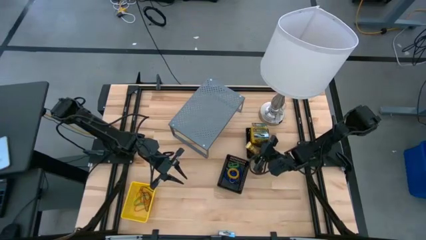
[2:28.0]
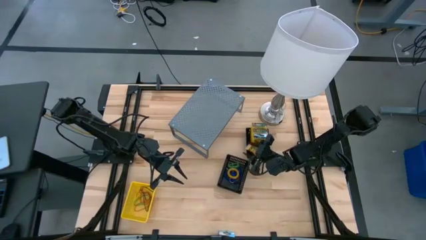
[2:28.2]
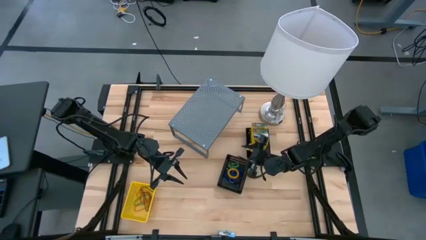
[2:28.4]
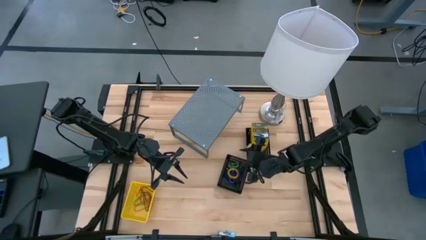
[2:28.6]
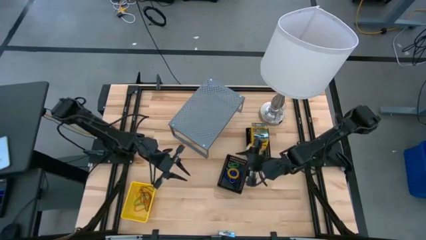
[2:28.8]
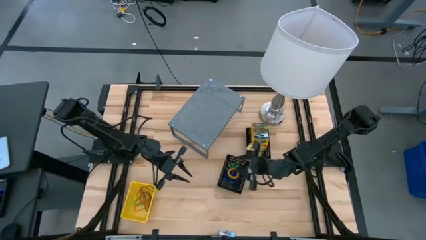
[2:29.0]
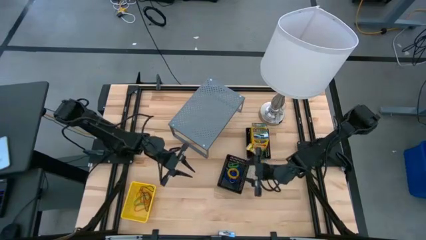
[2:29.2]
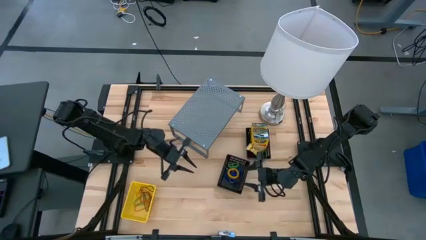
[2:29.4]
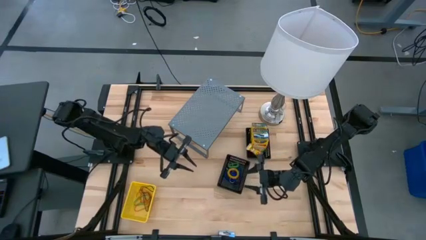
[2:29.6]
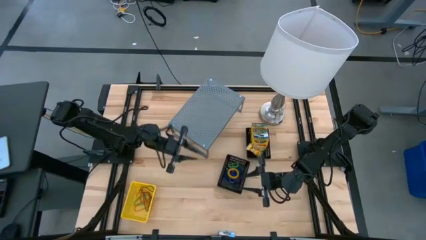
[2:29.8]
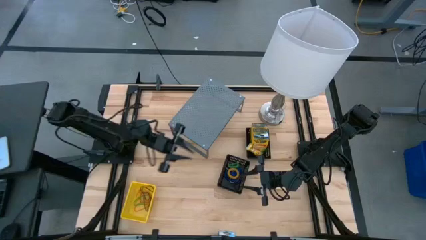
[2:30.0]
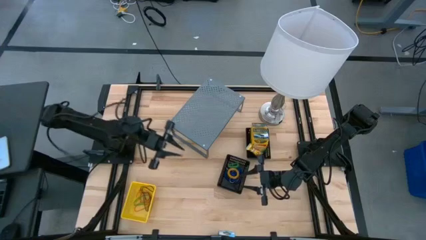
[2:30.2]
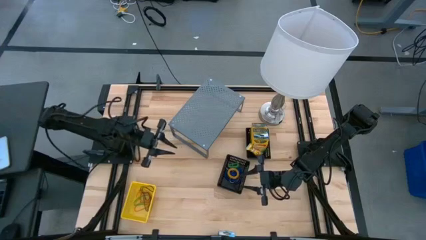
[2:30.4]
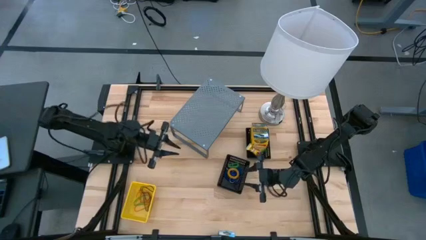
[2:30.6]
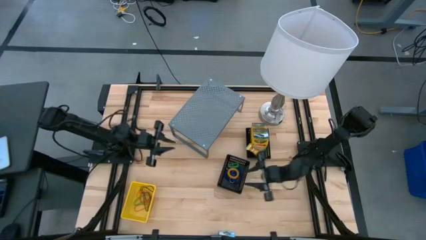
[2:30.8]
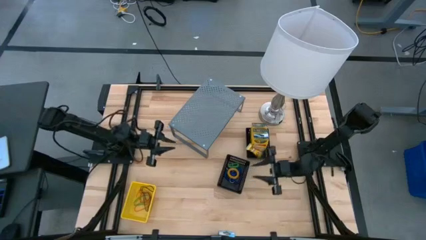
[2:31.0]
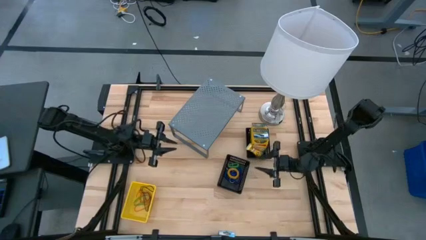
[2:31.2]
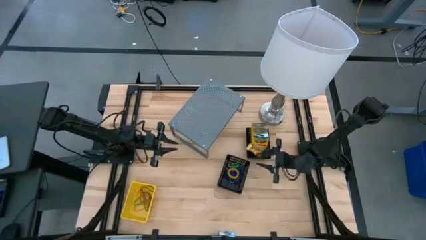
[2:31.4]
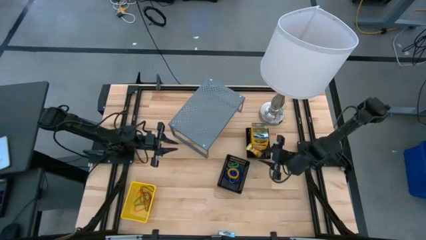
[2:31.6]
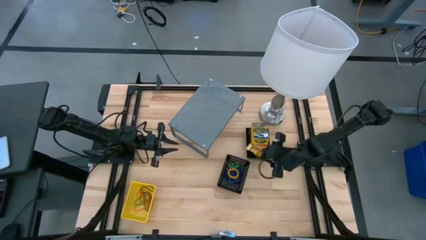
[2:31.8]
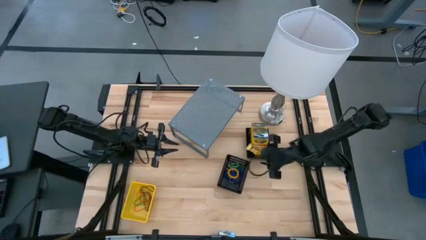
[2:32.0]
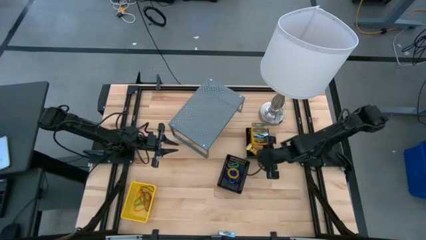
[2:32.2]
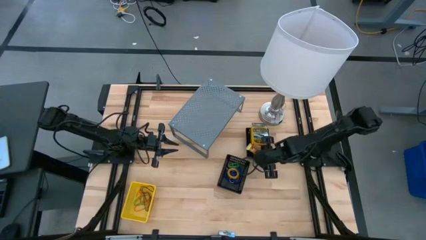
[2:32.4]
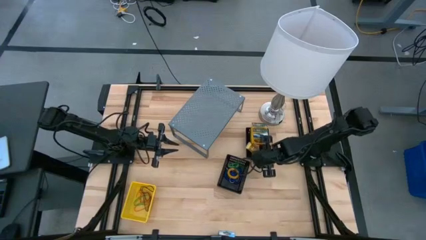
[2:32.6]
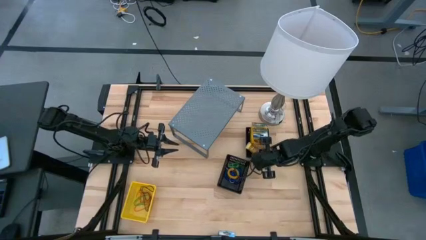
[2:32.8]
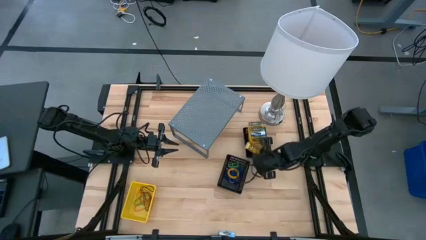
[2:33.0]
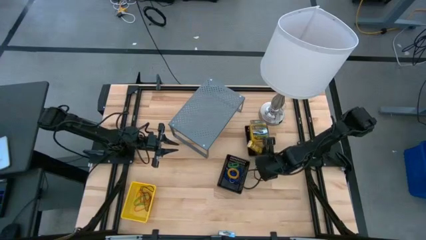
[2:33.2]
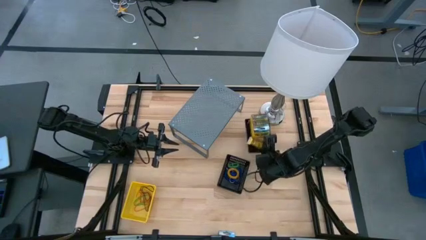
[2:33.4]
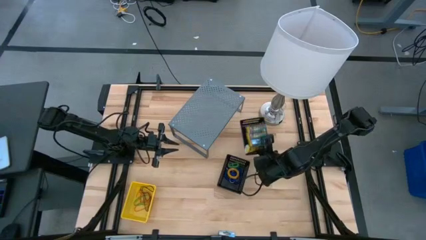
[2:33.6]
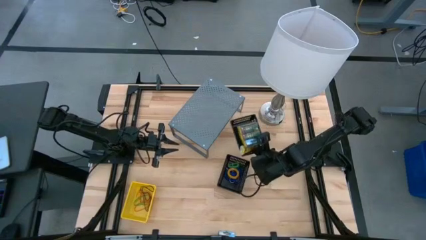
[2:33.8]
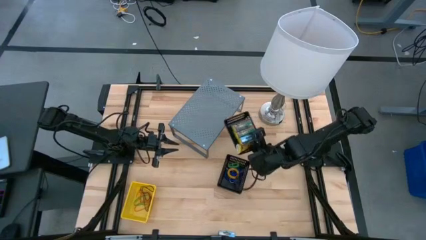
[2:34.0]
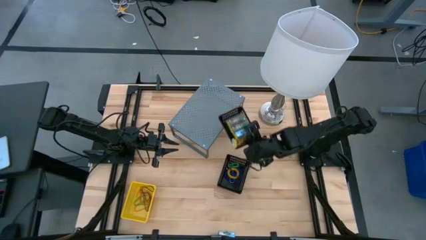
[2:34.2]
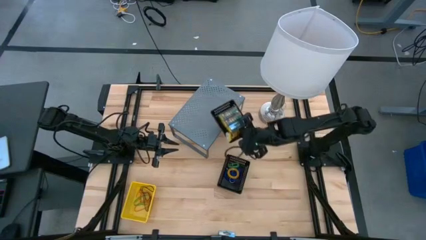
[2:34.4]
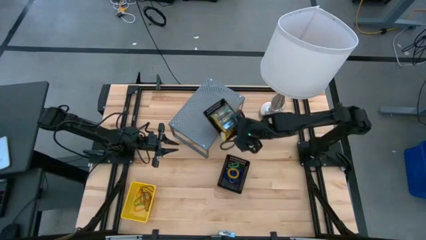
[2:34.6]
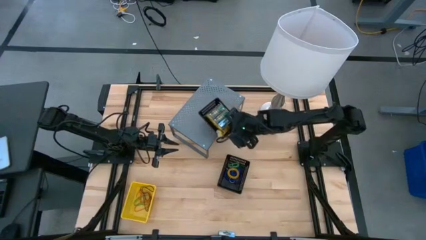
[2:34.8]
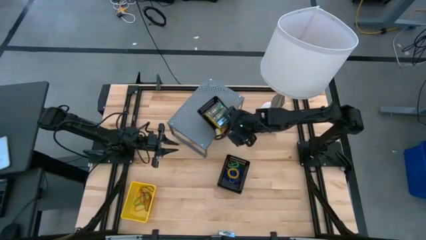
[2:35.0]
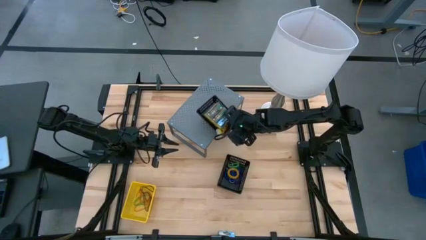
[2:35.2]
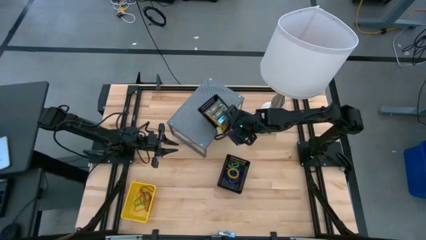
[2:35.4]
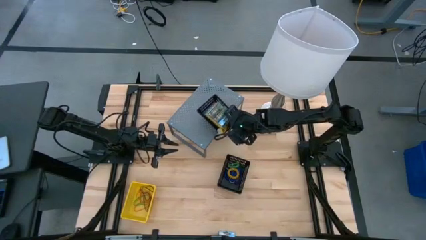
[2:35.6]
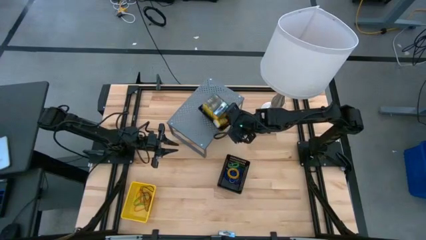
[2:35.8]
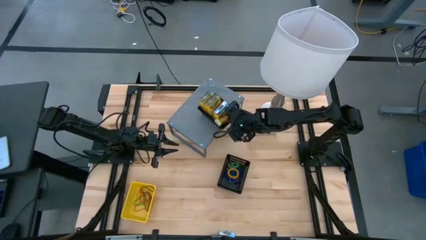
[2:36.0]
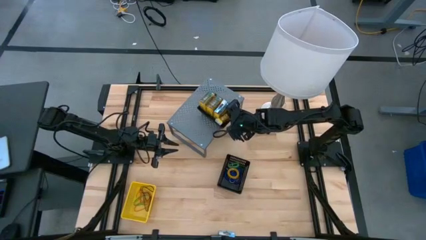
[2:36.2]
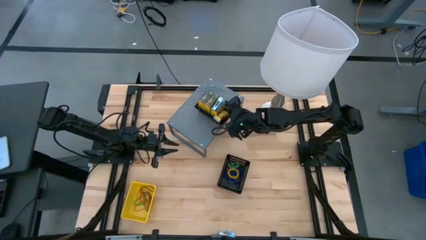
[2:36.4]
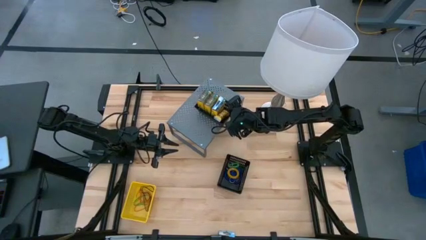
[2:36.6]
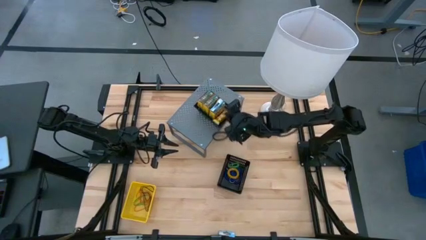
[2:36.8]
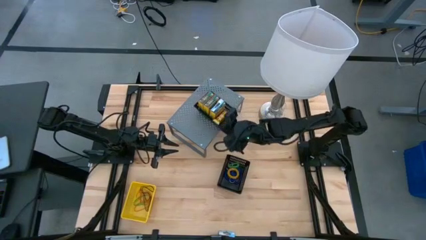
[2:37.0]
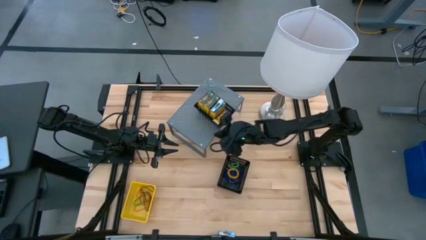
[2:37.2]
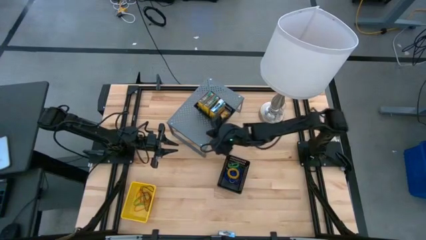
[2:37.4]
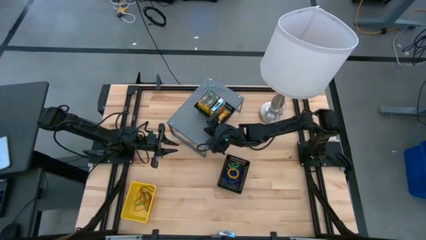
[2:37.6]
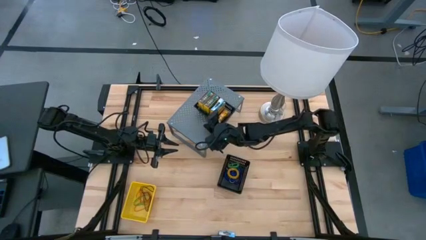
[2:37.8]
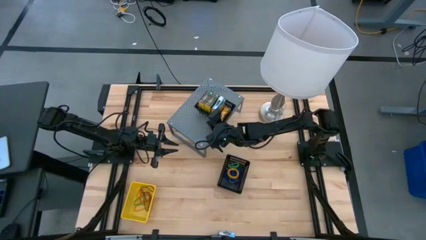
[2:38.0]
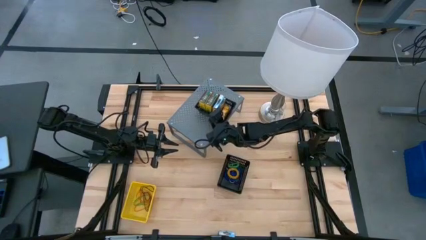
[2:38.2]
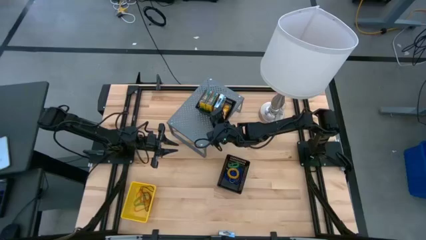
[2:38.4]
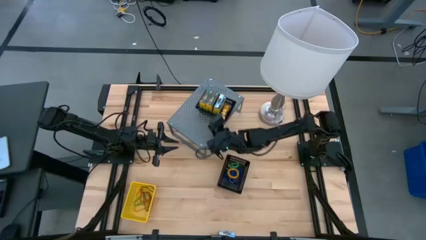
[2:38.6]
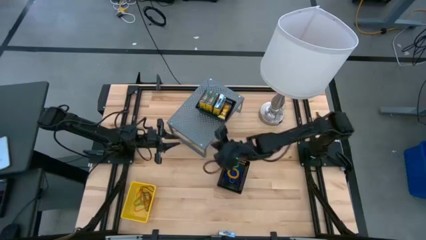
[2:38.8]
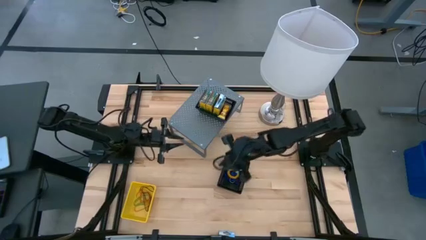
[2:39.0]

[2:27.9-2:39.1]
Task: Pick & Place Office Desk Supplies
Put the right black bin on the shelf

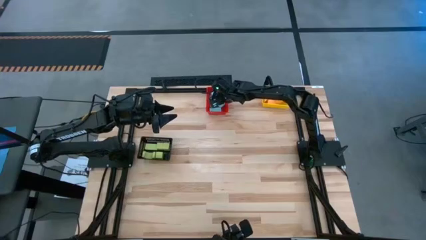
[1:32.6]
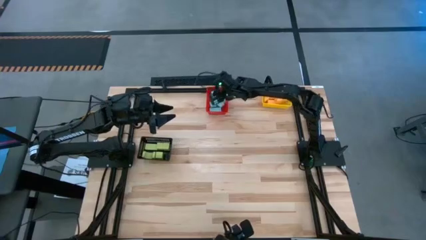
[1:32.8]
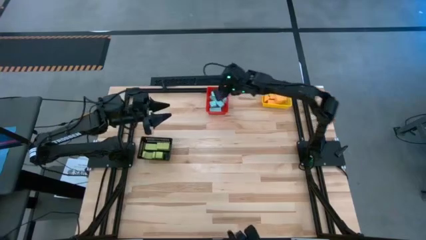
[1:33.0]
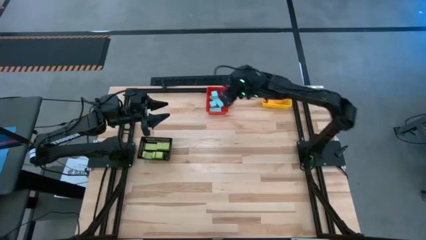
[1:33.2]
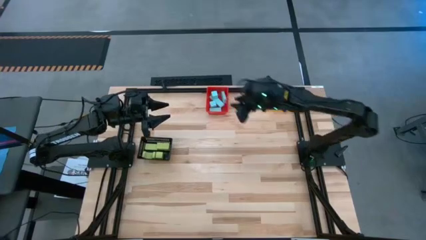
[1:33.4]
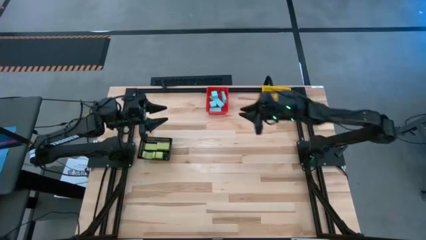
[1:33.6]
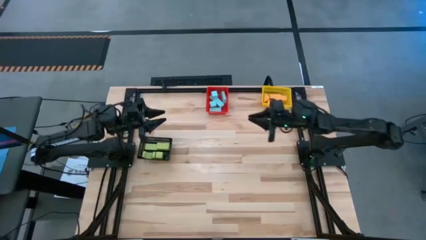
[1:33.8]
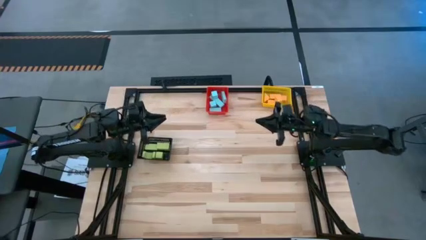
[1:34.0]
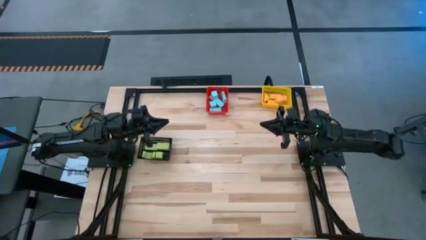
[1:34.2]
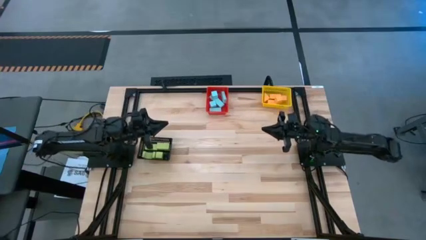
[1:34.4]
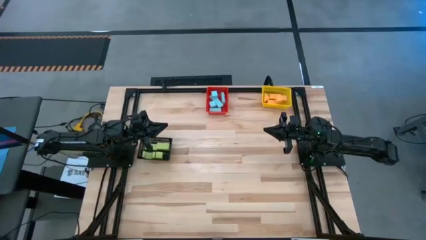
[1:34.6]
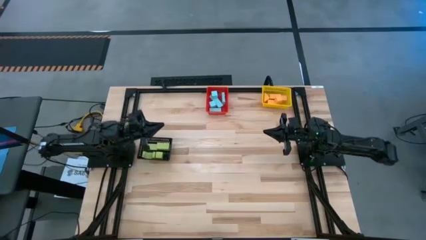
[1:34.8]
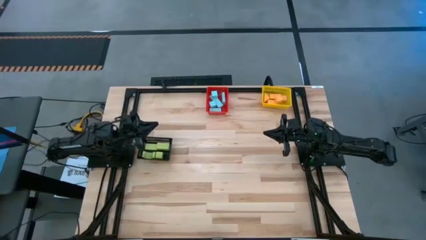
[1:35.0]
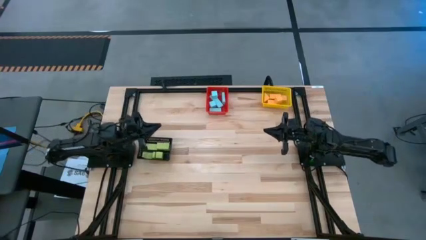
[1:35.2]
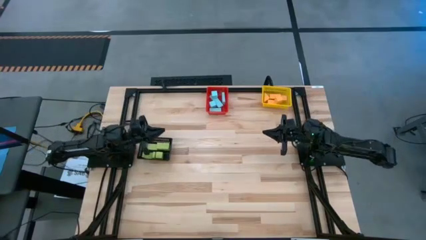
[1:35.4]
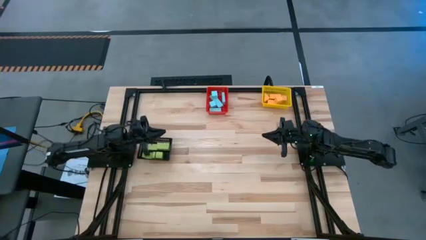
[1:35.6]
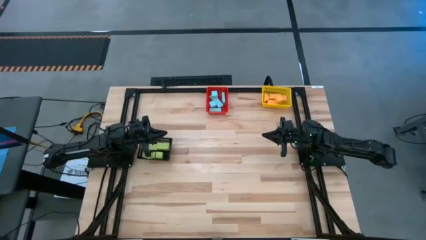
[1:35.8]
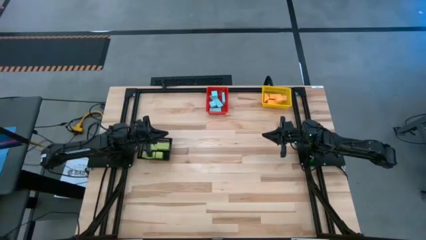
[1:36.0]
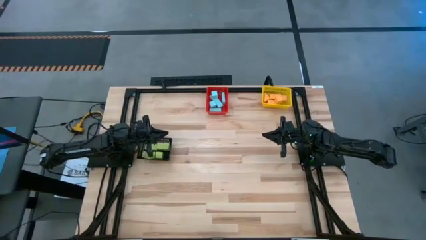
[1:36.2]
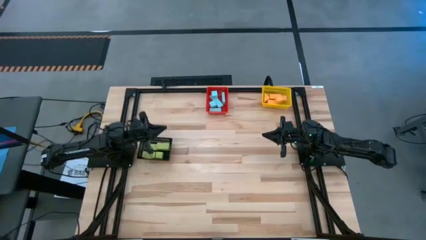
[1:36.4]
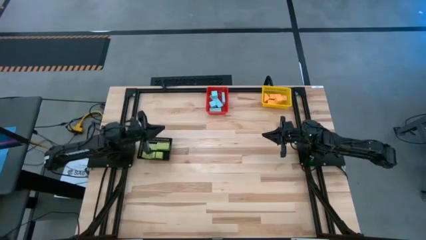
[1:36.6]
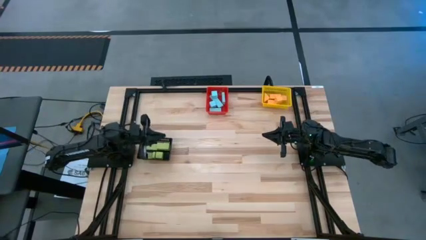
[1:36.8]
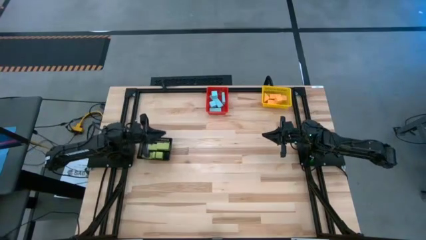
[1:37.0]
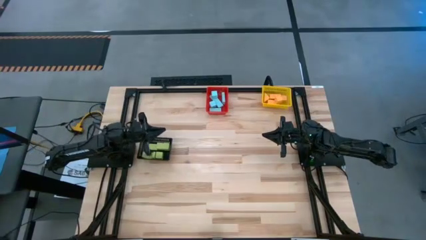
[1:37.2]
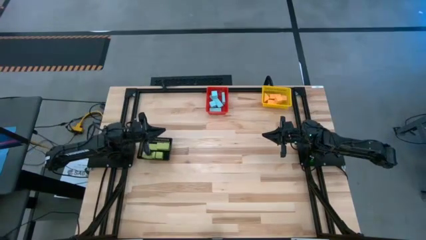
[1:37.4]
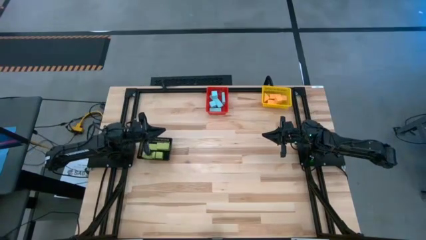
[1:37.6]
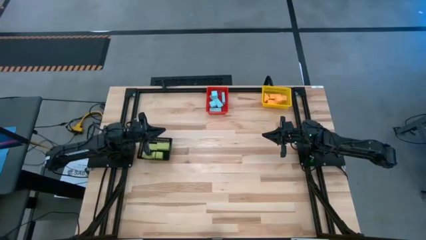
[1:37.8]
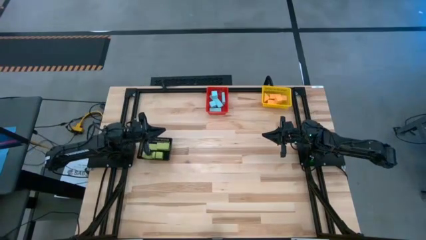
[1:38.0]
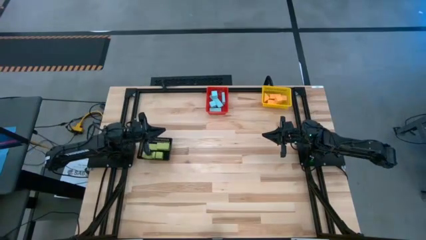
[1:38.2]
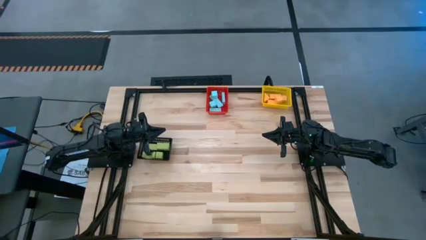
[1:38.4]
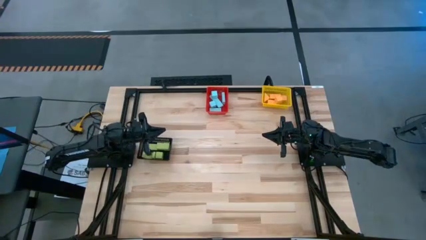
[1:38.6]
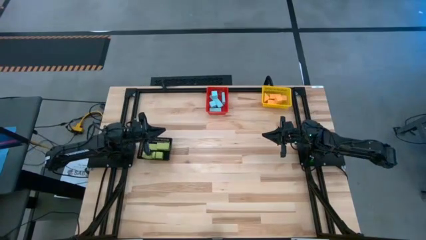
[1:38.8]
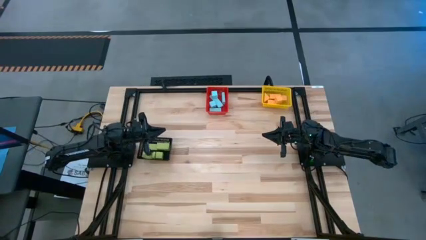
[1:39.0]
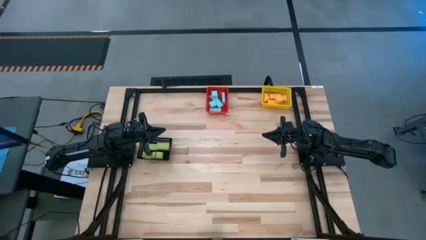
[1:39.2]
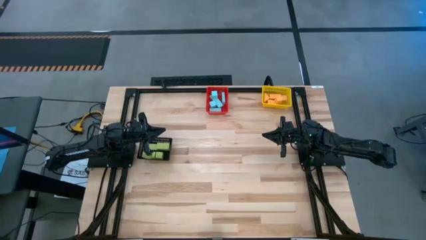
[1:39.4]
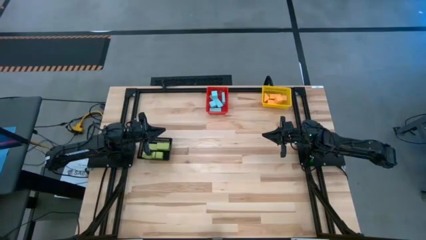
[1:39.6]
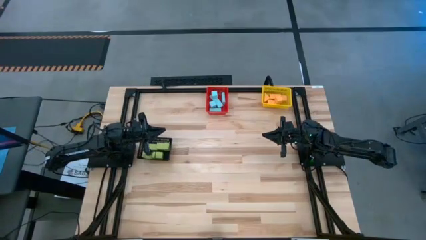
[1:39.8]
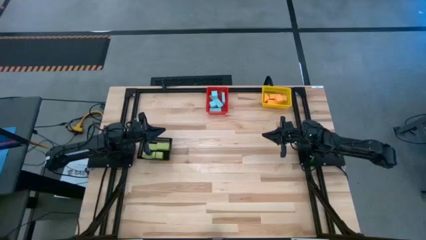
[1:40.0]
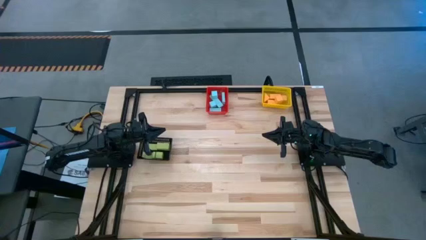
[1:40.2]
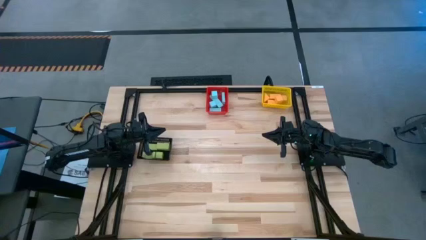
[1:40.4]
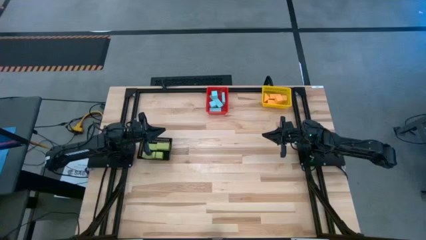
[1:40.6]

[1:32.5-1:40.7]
Task: Sort & place blocks by color
Return to Home Position
